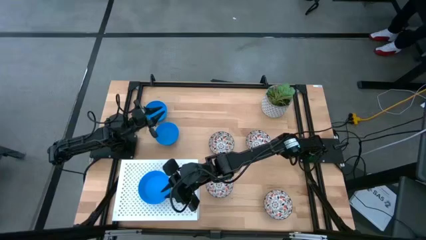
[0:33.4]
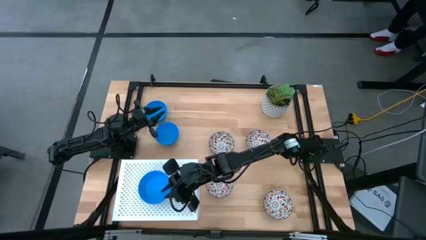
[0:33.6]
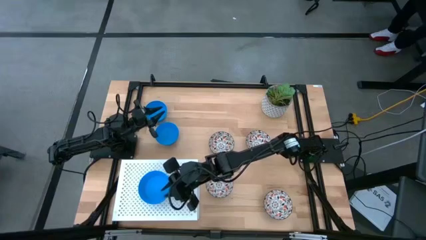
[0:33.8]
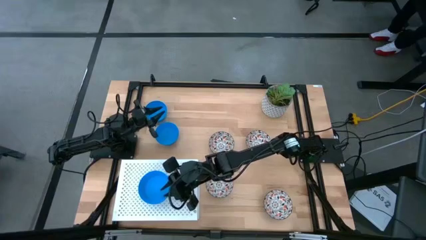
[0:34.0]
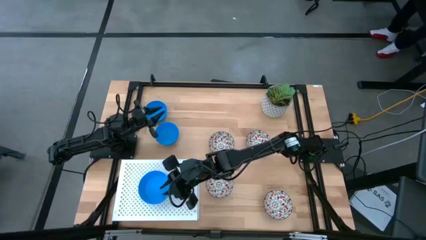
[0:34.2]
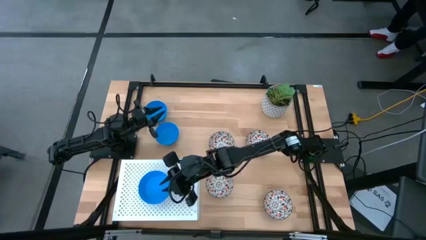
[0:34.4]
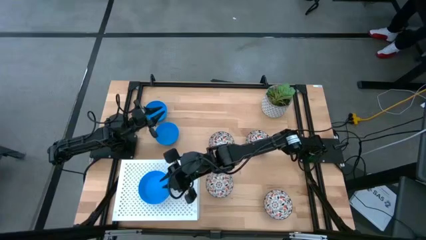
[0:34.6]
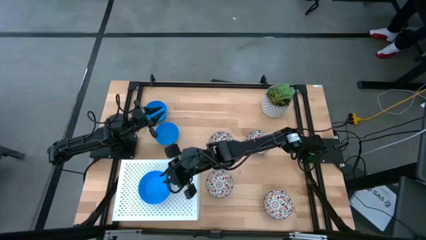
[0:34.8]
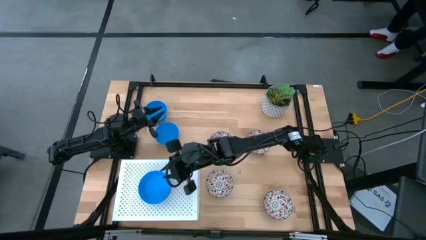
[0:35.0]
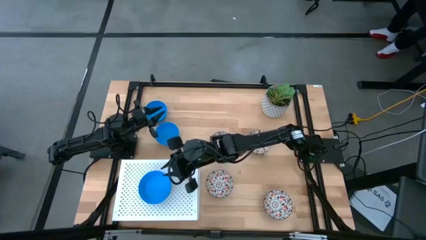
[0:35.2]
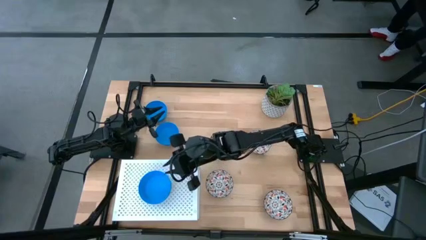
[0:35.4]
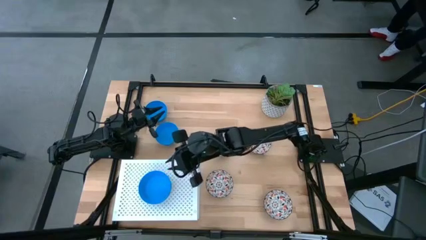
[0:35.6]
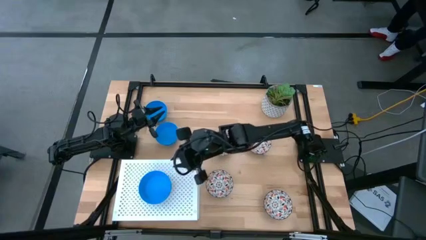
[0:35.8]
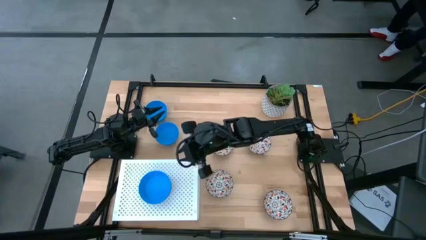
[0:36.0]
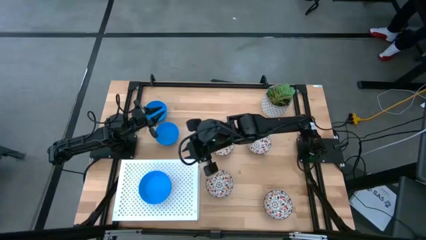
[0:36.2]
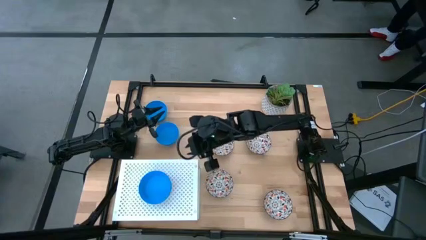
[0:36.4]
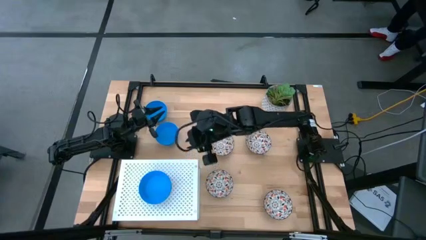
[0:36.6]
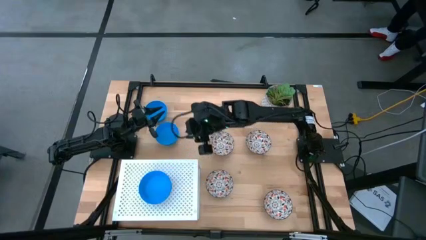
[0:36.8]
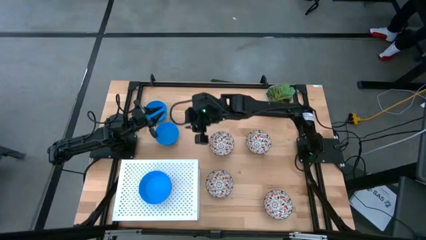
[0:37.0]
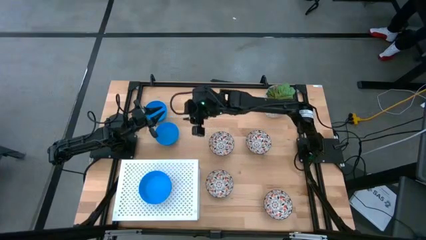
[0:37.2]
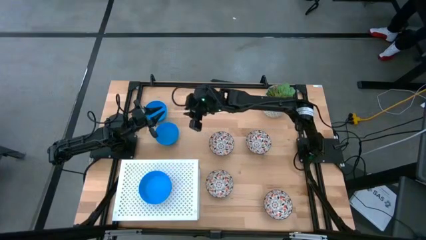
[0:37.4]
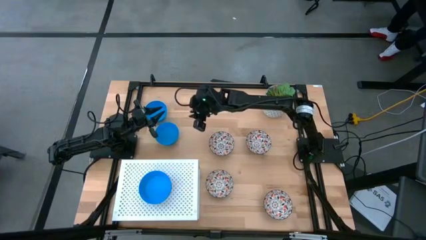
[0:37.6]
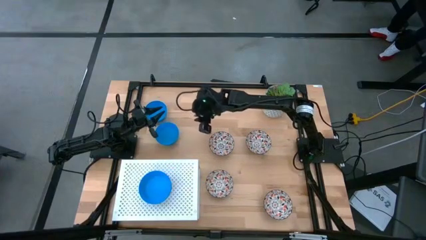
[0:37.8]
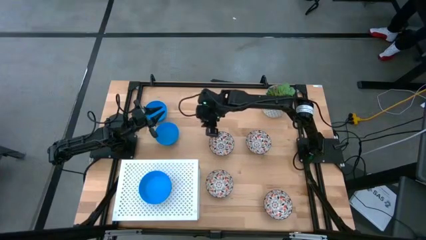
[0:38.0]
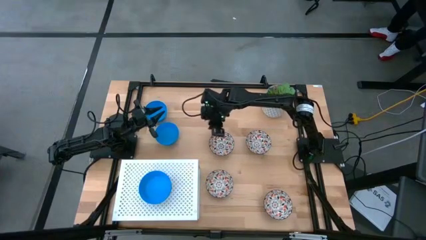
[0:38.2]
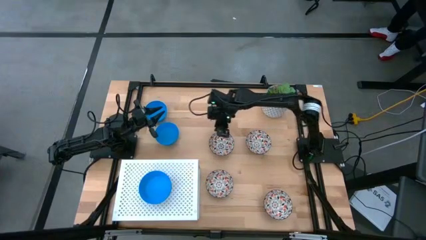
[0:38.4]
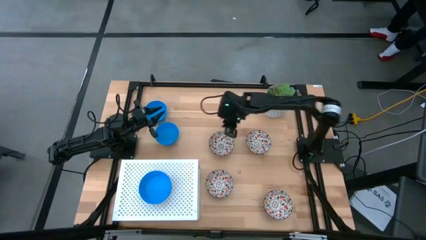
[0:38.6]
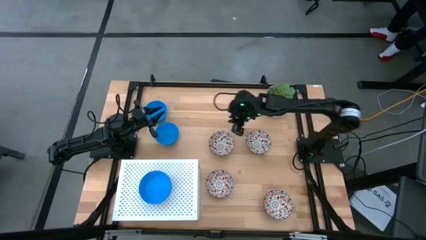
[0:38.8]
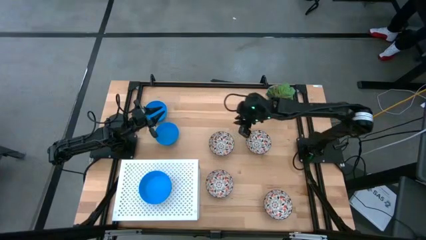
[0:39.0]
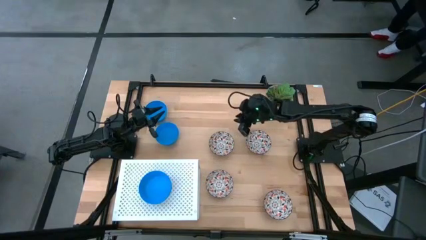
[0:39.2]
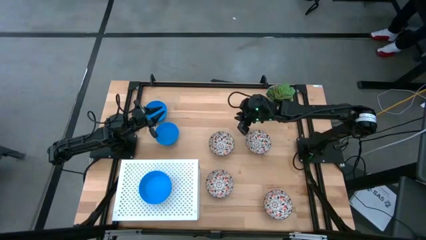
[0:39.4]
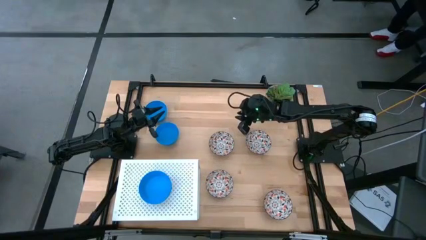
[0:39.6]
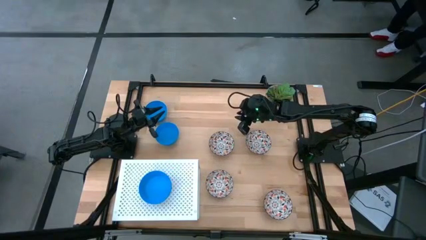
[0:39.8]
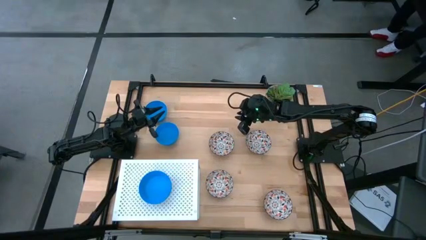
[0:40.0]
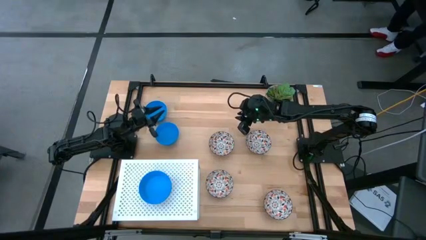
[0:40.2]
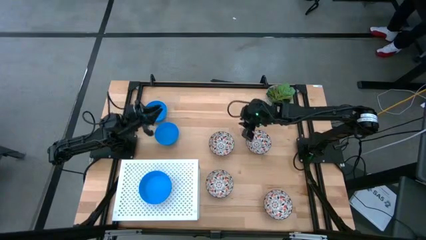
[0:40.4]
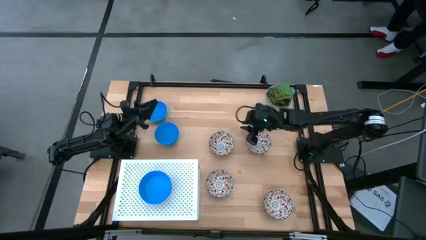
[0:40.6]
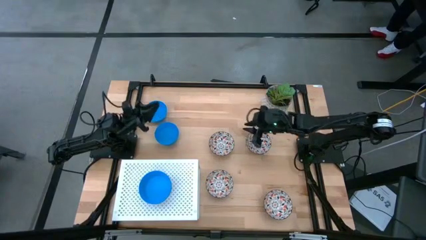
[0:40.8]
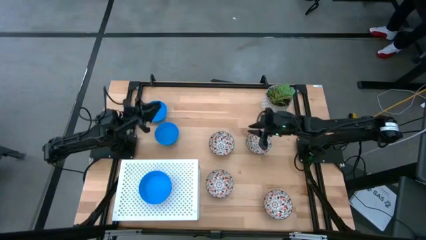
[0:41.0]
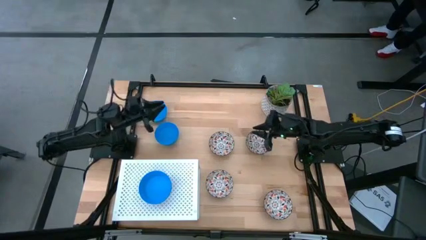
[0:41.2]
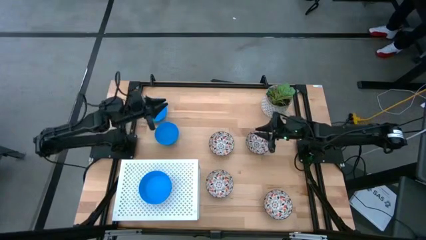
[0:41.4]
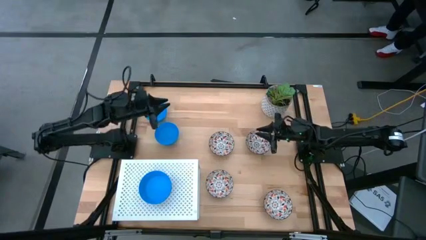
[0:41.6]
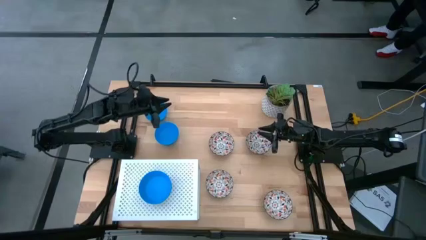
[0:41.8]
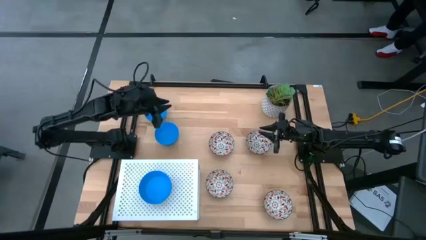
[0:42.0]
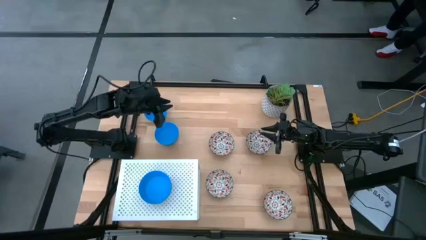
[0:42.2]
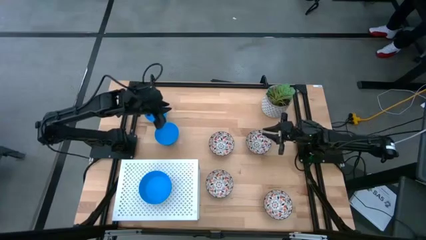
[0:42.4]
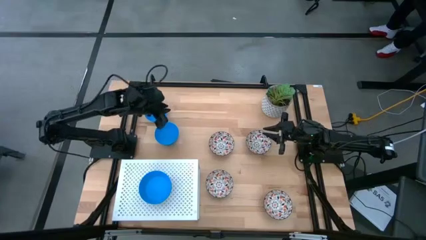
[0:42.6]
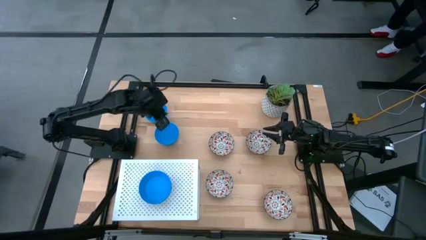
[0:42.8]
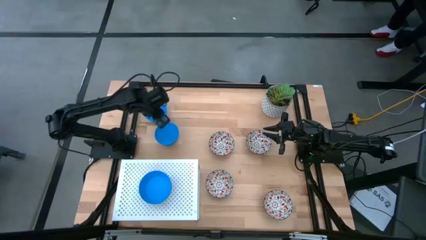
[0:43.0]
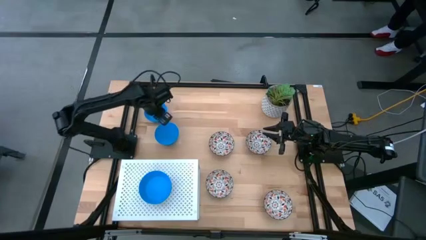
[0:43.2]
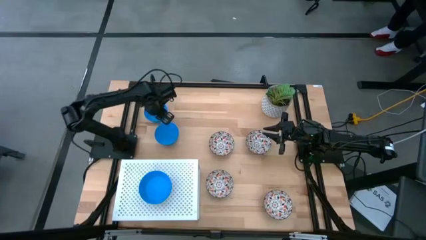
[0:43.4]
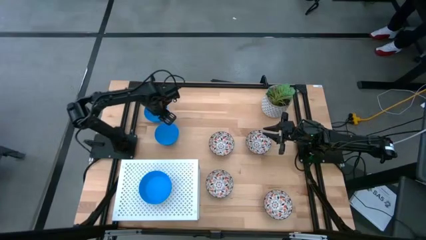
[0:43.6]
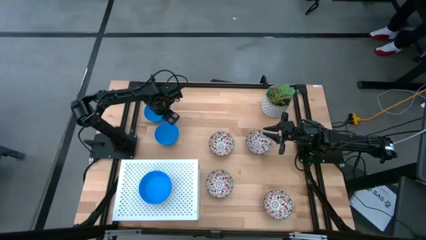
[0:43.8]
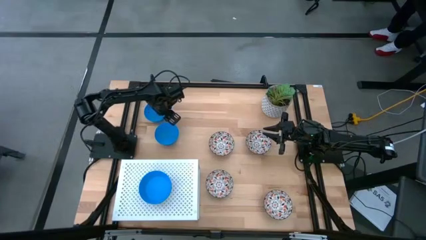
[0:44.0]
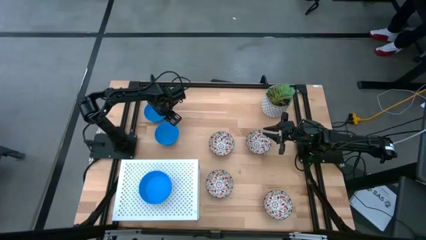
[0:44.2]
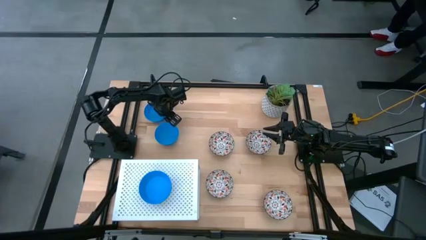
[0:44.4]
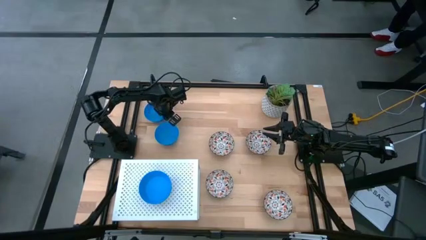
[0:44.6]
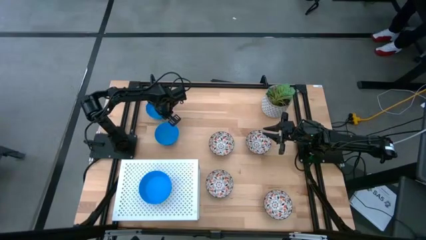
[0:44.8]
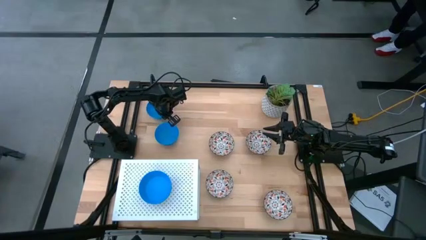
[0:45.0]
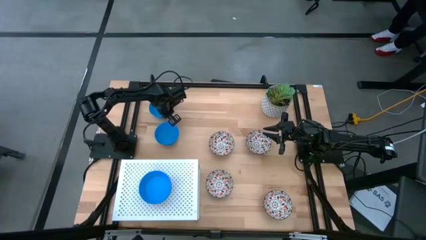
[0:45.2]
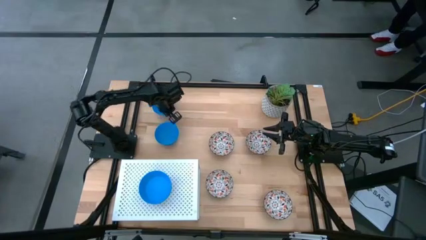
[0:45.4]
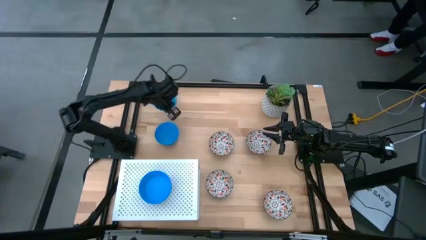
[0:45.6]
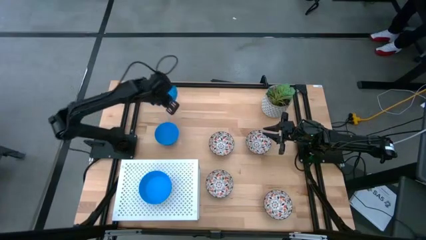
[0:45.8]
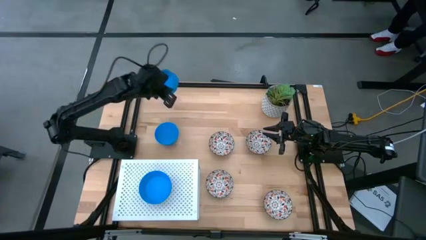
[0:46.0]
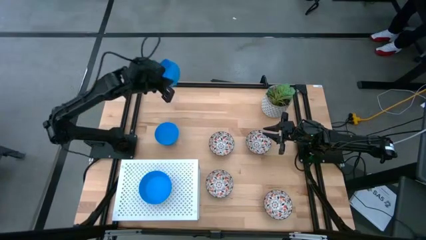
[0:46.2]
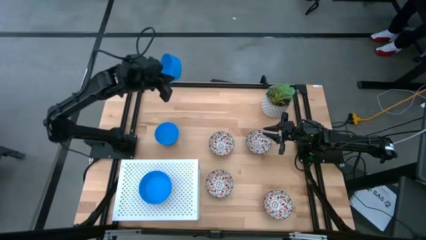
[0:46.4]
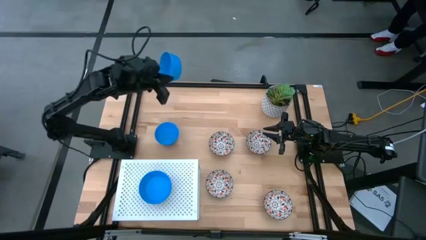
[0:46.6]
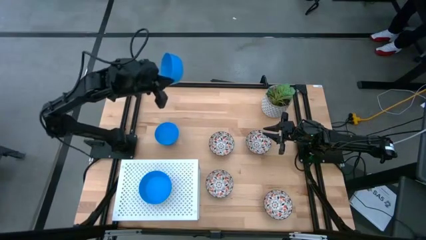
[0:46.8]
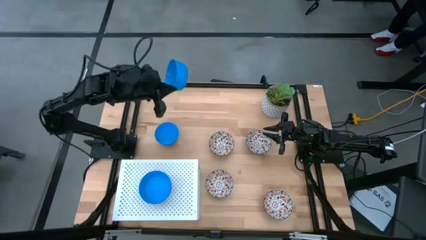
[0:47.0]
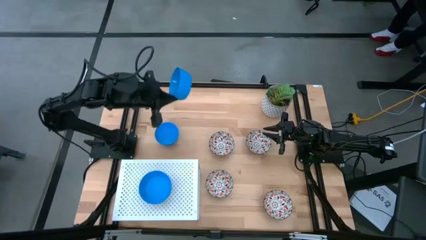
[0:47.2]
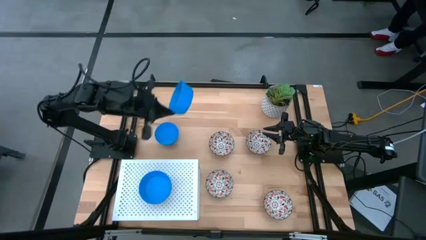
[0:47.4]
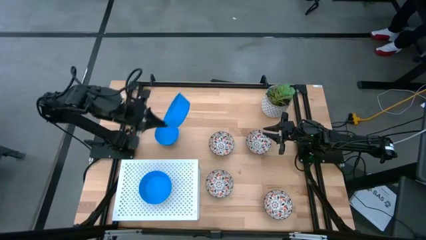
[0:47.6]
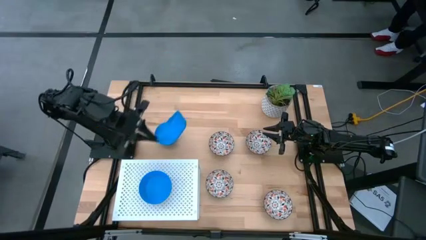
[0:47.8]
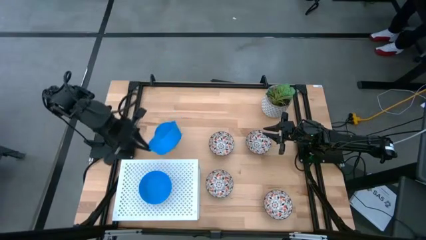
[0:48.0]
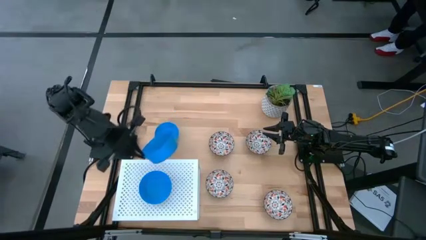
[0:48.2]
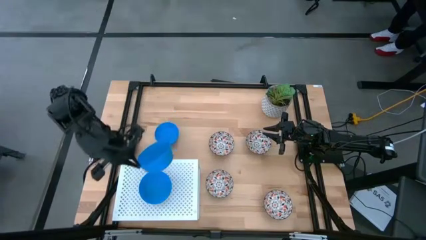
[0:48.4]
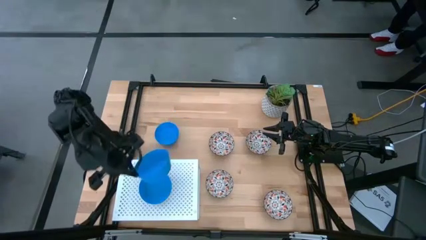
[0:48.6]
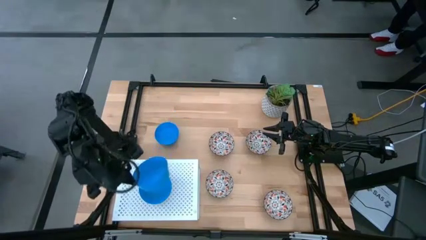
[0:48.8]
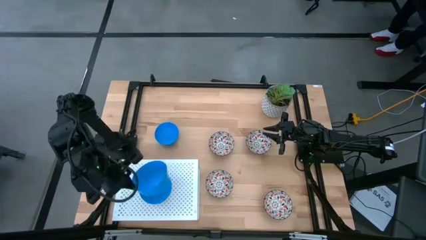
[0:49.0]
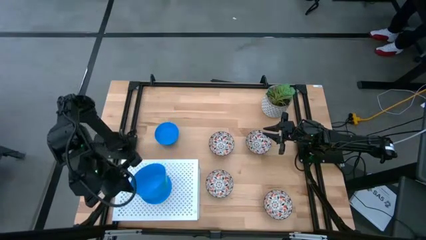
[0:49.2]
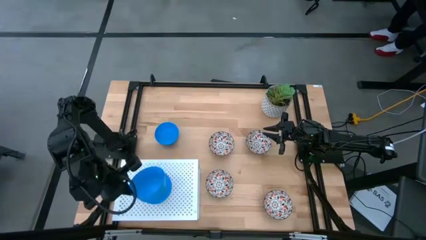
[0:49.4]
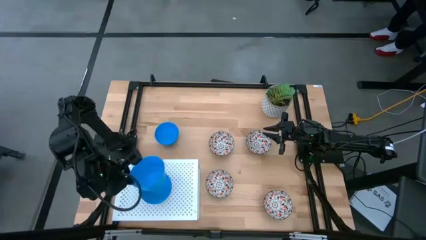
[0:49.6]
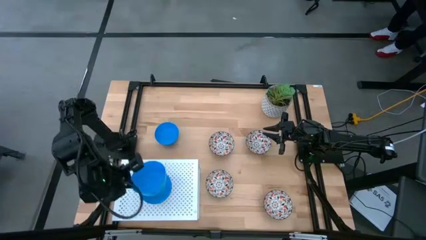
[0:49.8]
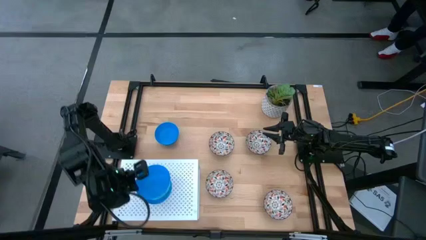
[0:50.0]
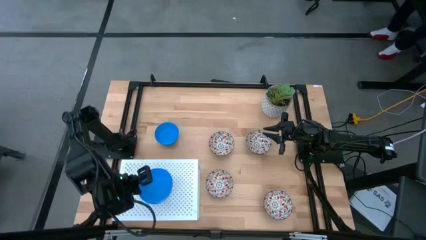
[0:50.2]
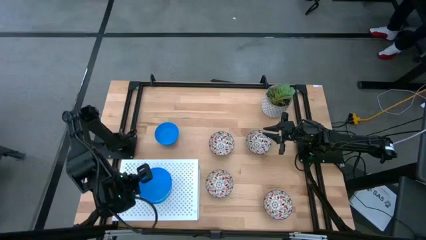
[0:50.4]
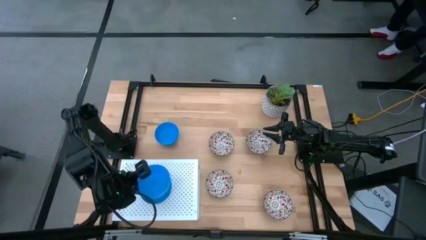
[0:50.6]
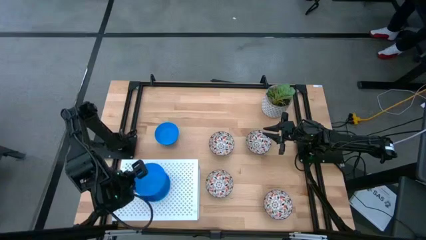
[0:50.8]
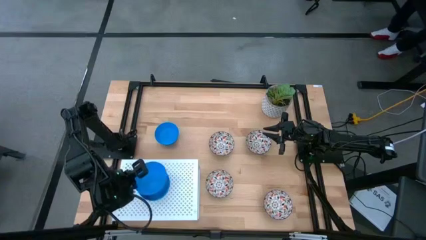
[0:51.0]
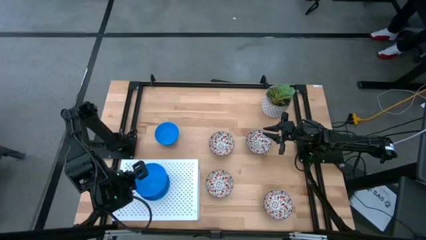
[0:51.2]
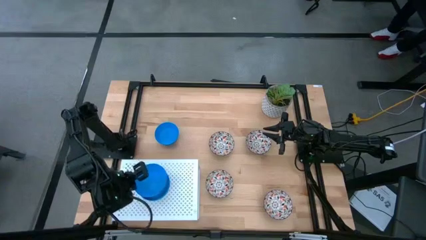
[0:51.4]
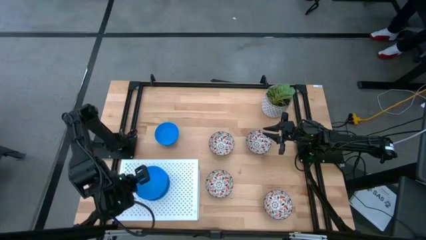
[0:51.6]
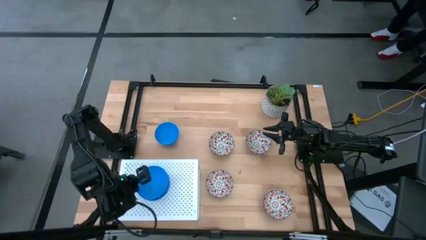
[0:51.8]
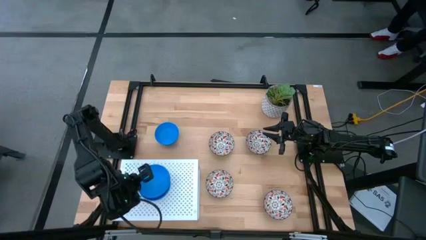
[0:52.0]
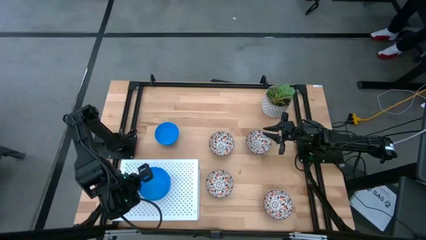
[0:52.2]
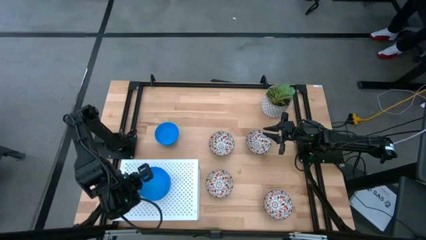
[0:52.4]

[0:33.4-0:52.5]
Task: Pick & Place Mini bowls
Stack the blue bowl on the stacked blue bowls on the shelf
